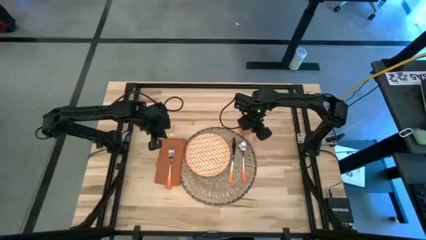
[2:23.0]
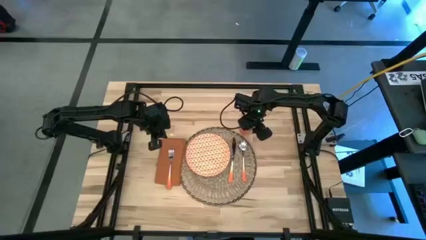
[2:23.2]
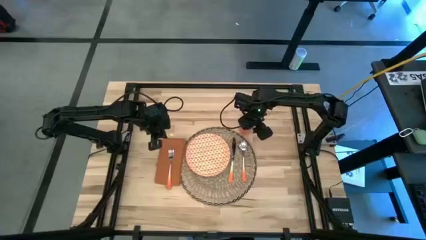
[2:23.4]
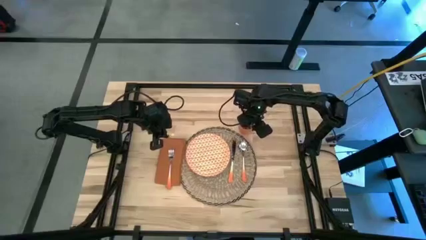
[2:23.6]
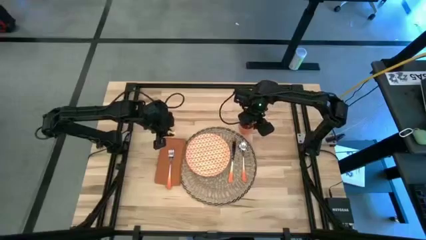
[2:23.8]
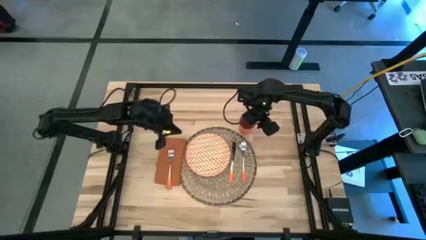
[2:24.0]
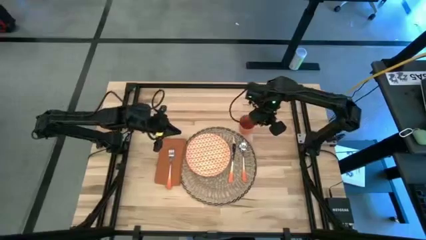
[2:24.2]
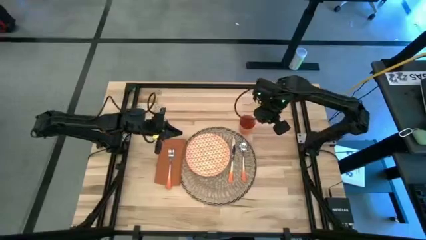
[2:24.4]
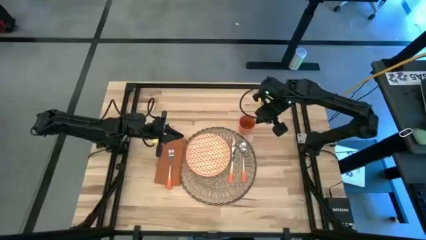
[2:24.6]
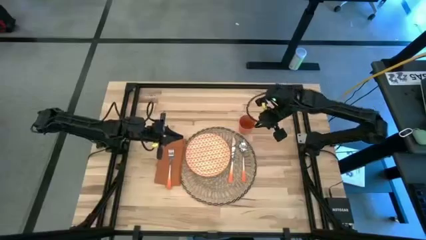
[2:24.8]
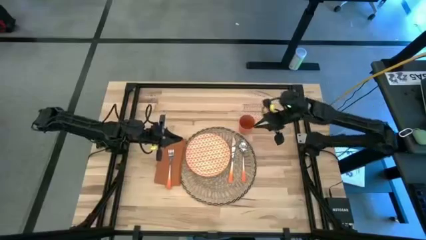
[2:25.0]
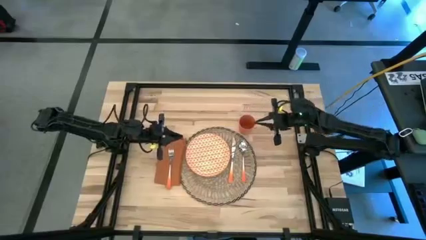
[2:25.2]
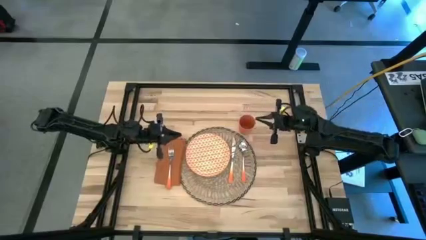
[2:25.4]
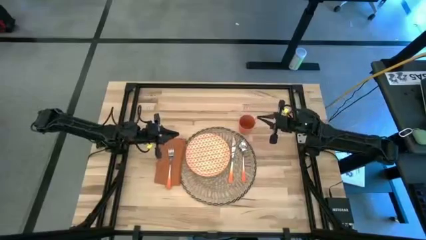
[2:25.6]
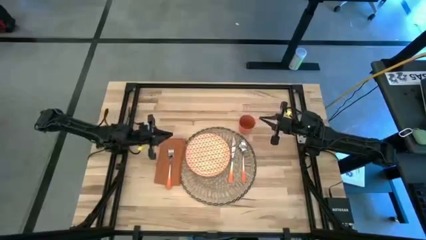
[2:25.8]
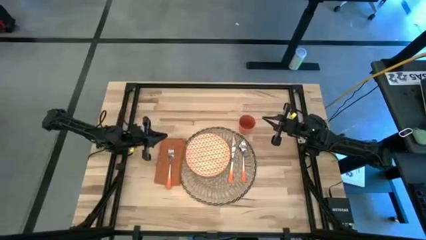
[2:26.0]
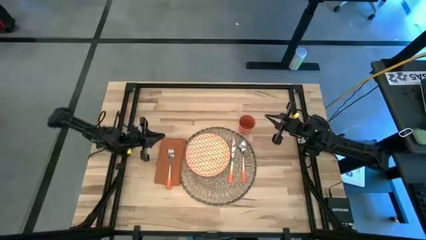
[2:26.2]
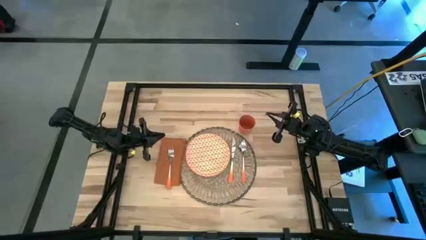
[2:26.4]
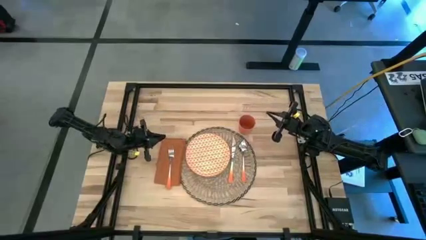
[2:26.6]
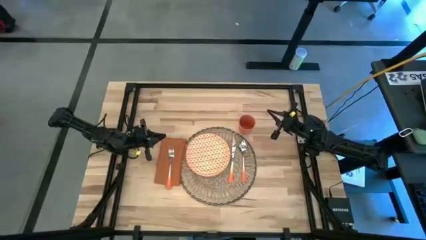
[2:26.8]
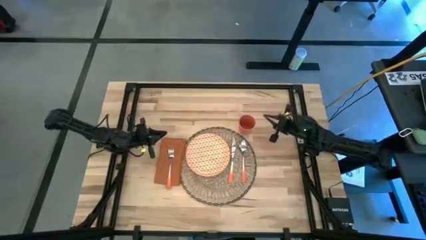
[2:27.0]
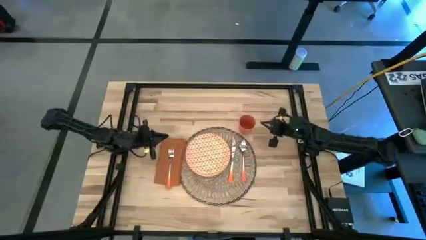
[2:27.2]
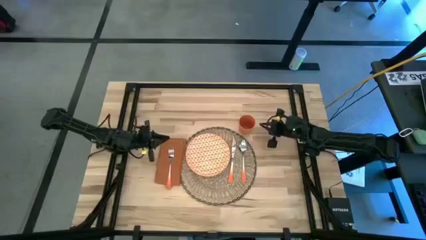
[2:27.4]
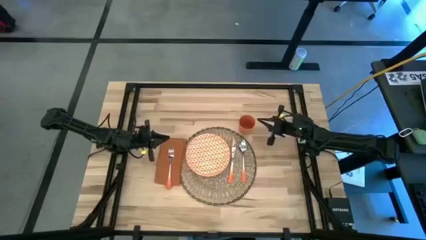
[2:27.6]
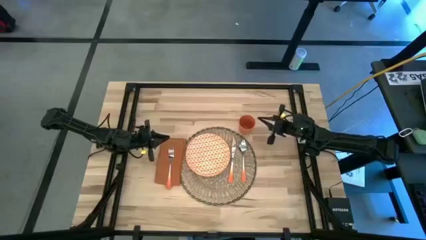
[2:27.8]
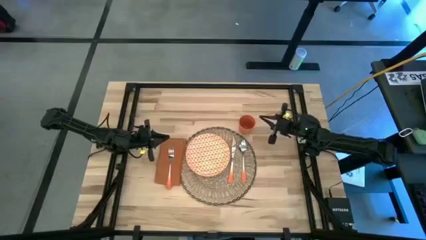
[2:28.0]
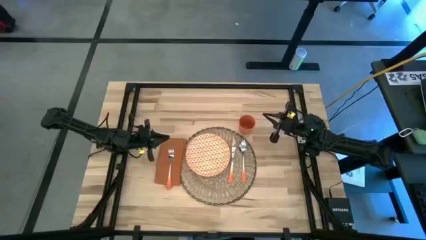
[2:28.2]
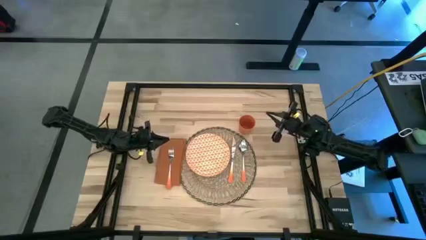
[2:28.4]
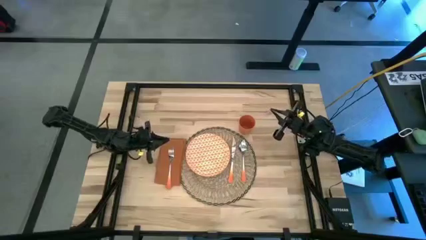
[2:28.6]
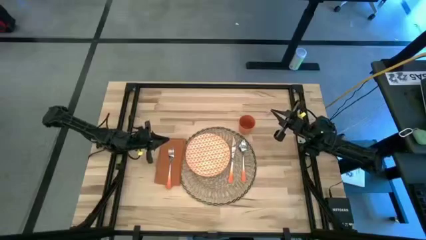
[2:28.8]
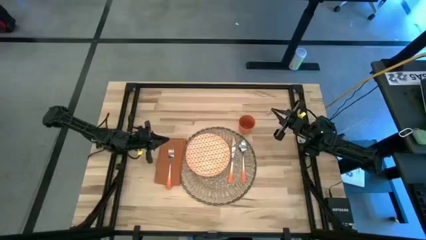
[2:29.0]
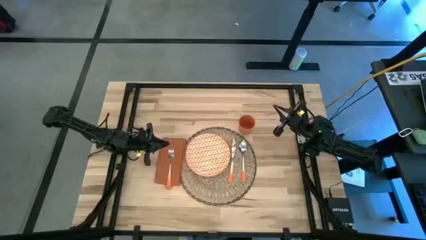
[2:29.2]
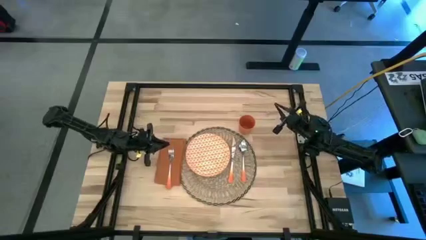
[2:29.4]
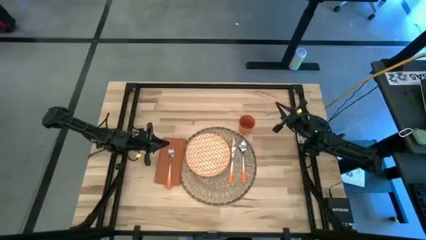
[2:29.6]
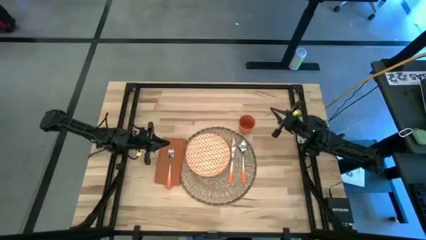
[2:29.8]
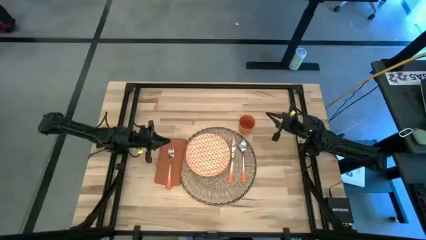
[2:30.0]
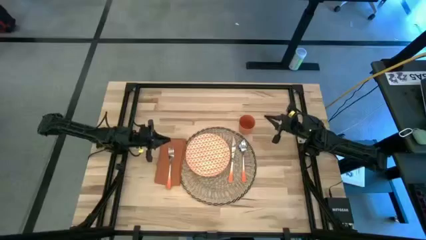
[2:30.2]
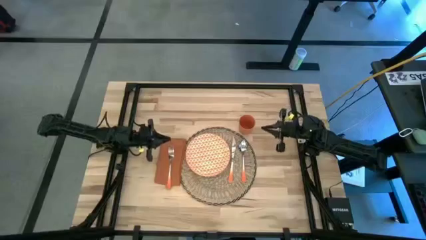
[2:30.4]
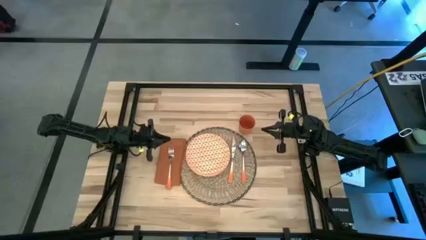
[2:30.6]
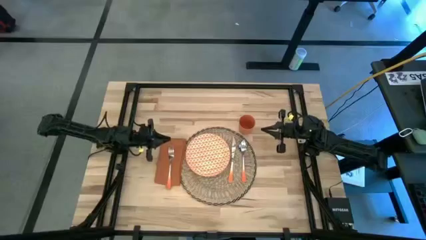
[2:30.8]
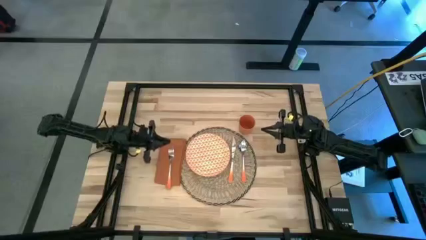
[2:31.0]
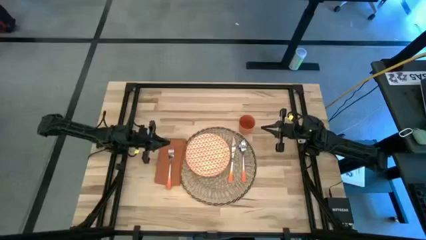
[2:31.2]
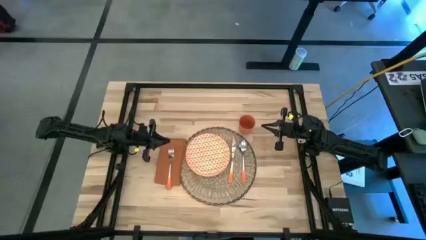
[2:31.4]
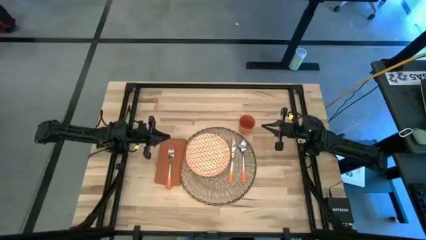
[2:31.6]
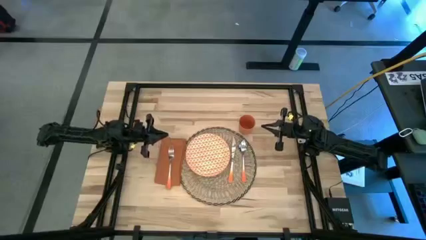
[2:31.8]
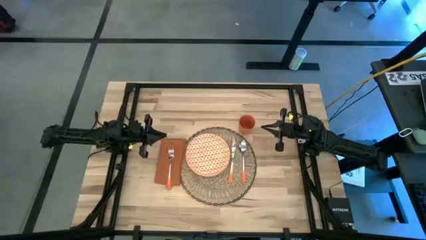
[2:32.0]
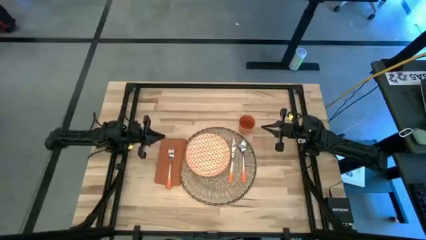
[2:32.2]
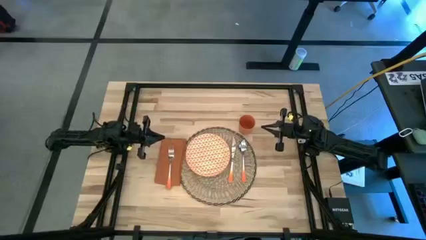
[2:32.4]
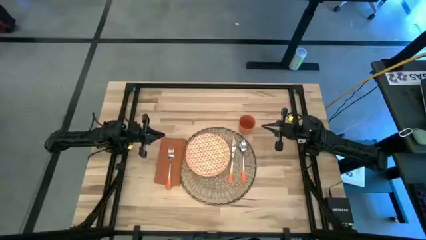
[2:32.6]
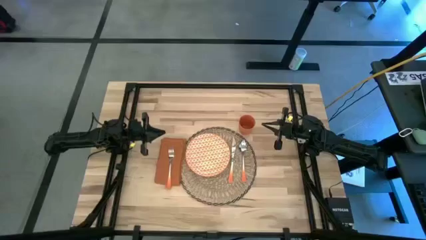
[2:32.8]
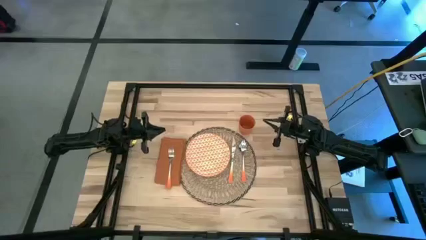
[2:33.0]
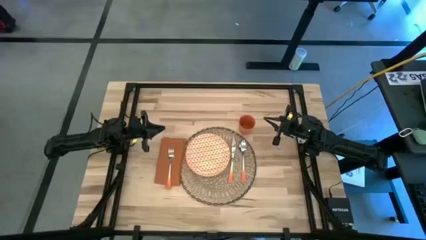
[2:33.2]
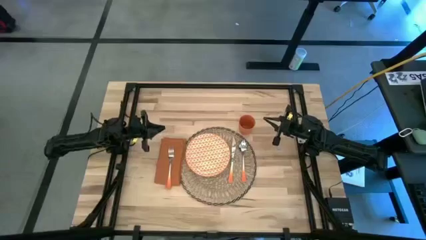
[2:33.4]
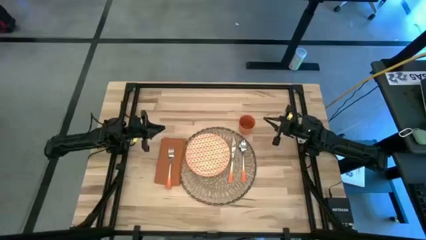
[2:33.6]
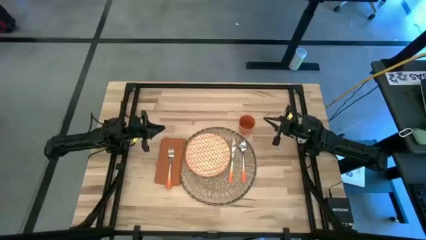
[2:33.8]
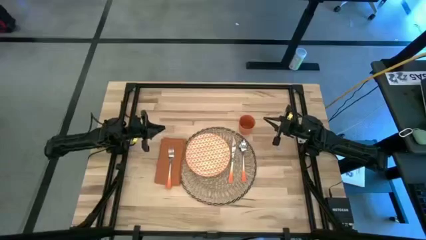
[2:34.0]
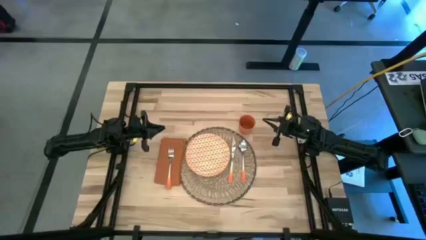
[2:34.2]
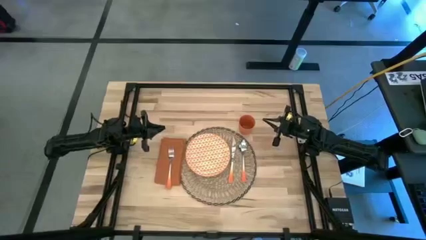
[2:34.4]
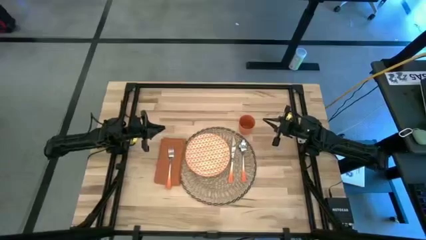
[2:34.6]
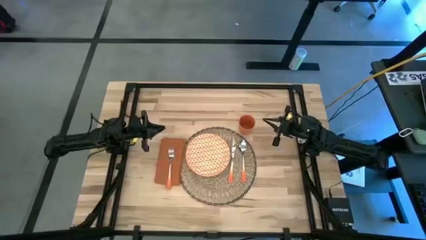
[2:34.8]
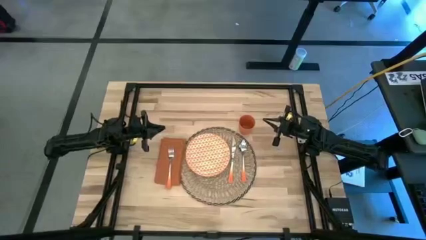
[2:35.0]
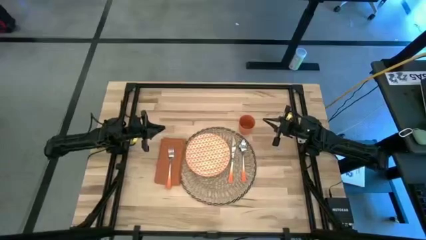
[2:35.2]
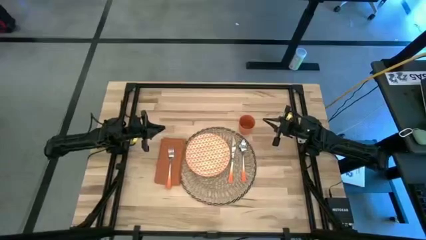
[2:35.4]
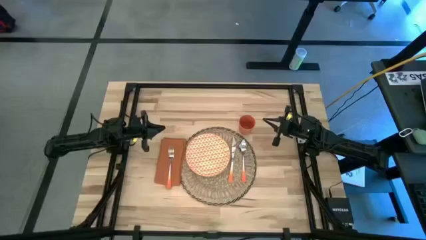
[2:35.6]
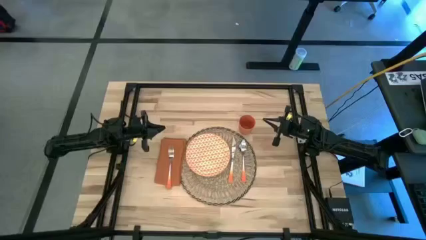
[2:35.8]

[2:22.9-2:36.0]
Task: Set table place
Return to Home Position

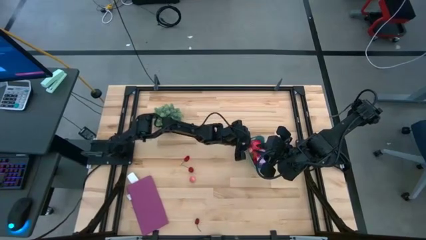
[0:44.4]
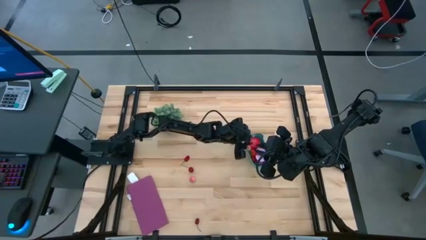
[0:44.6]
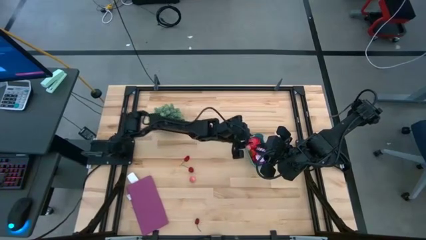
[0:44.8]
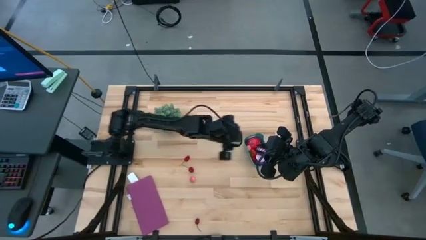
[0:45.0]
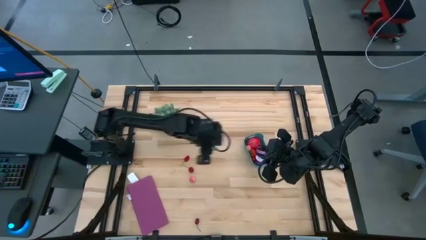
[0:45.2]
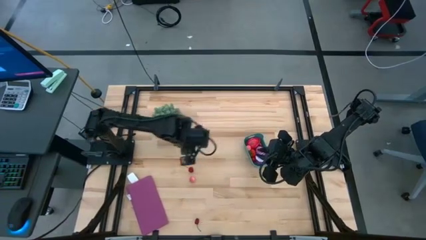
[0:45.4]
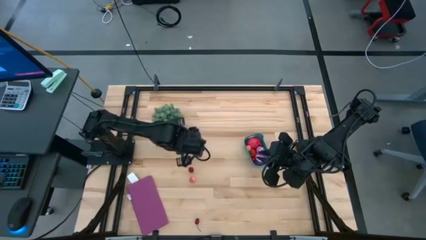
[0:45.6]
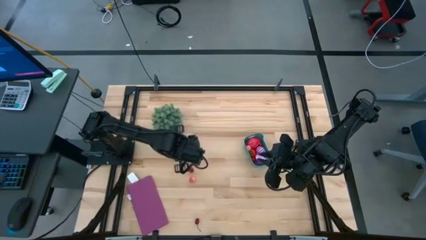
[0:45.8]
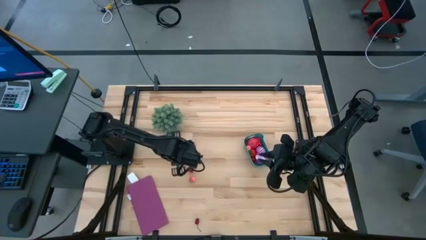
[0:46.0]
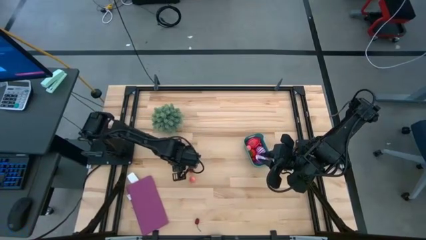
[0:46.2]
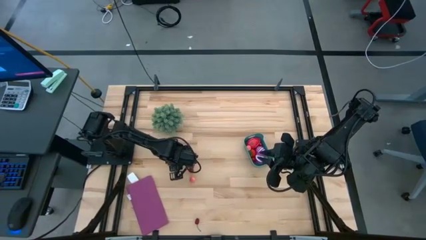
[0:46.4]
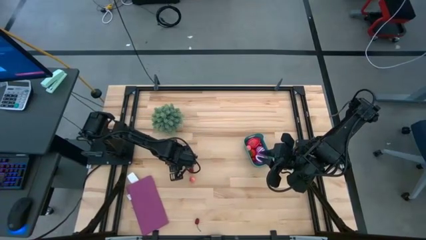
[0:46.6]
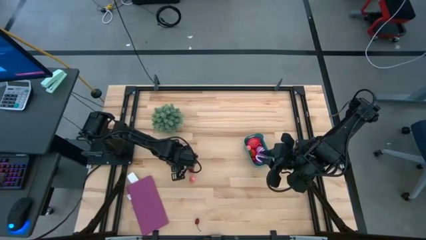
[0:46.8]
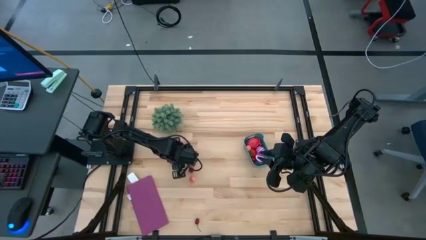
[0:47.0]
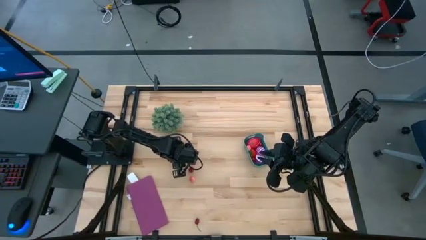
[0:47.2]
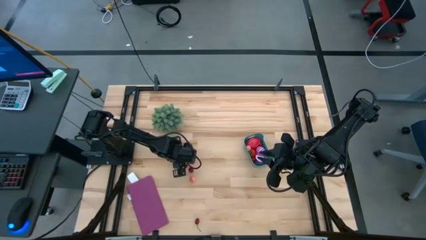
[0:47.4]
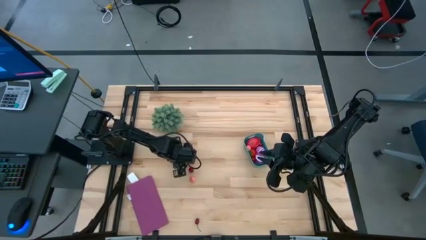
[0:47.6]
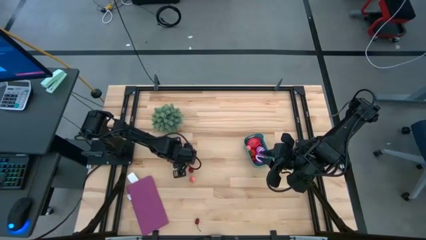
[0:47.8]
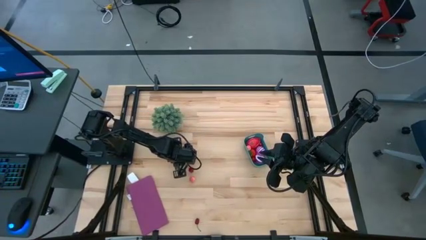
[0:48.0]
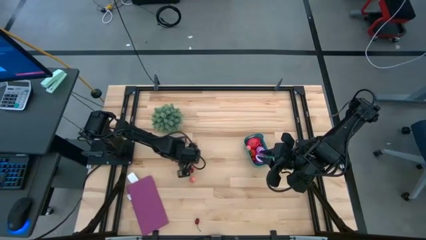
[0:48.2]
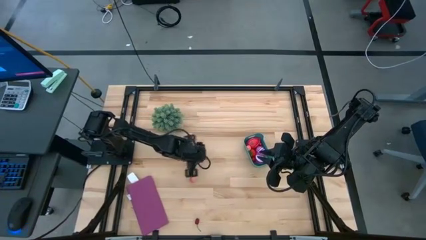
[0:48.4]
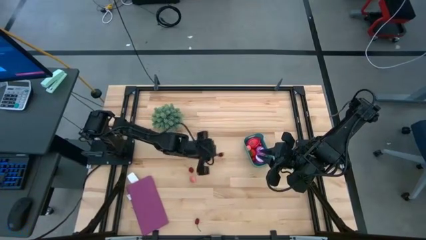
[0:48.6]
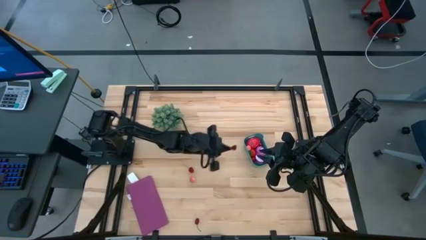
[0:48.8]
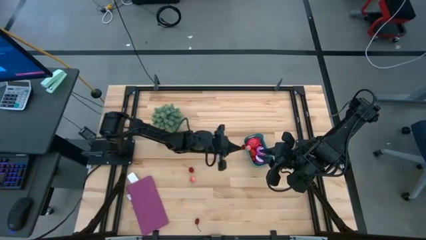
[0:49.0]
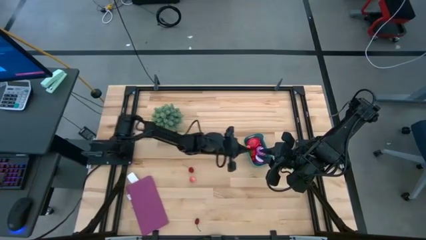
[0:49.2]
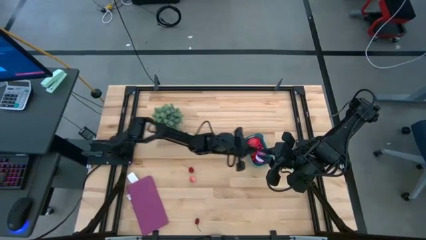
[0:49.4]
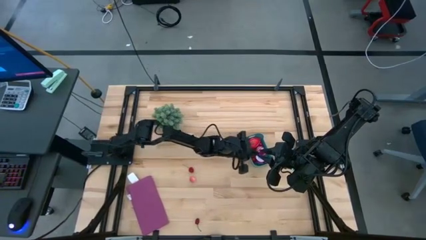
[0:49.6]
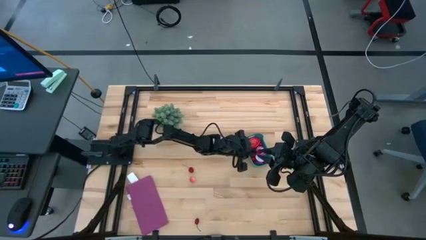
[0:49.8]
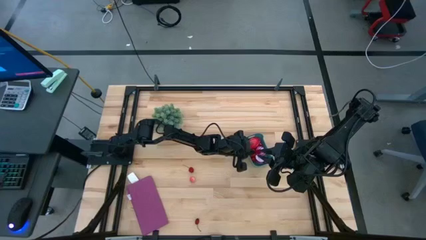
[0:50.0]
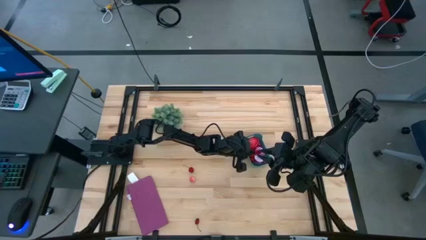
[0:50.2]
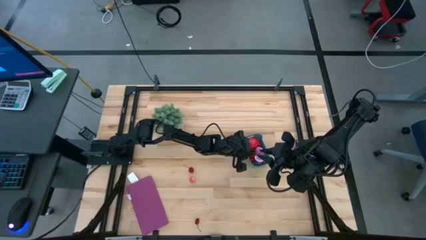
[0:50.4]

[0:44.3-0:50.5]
Task: Pick and placing Produce into tupperware
Put the cherry in the basket
